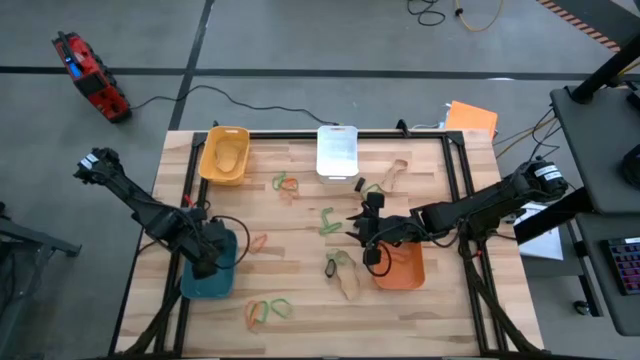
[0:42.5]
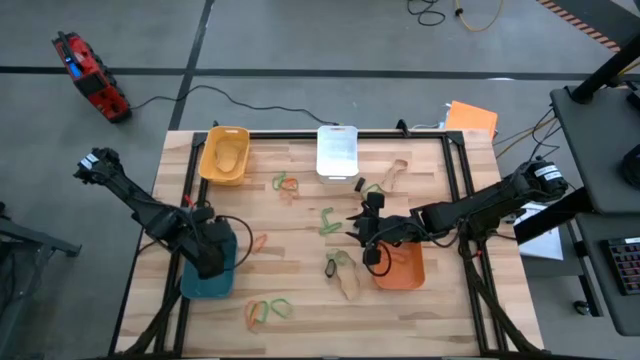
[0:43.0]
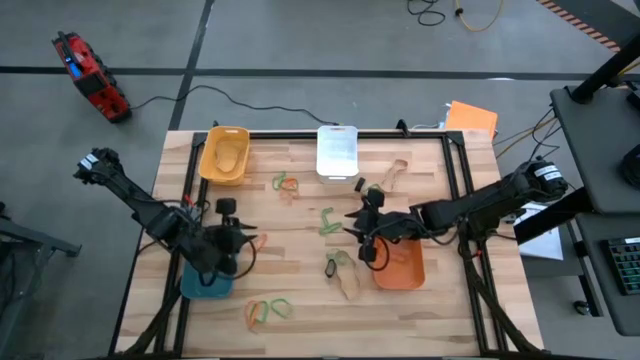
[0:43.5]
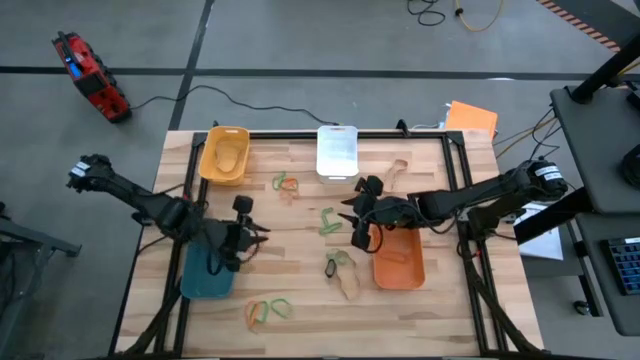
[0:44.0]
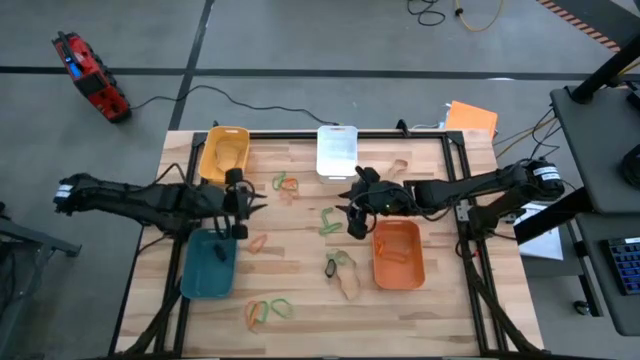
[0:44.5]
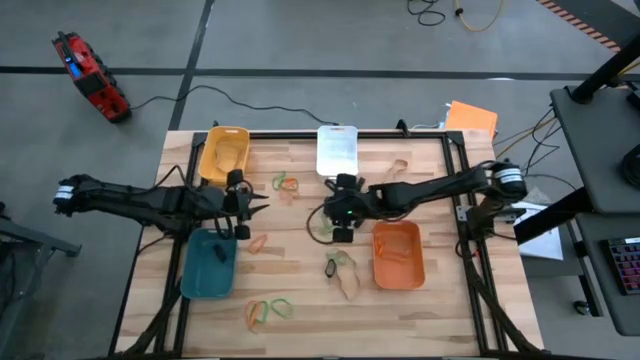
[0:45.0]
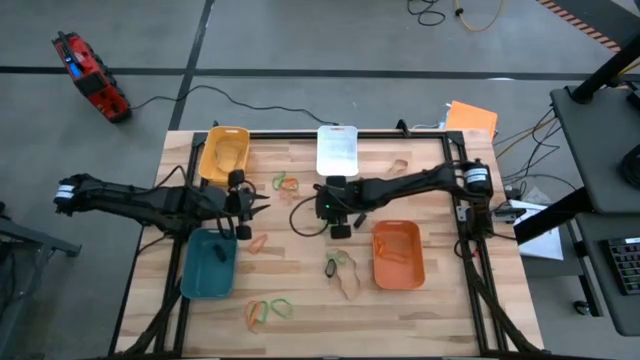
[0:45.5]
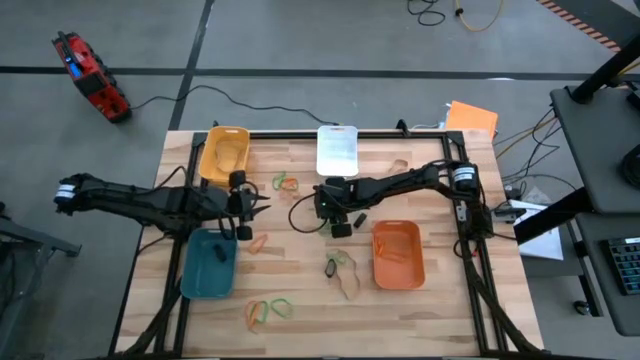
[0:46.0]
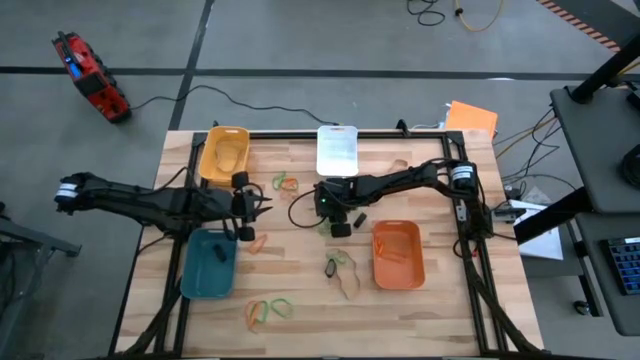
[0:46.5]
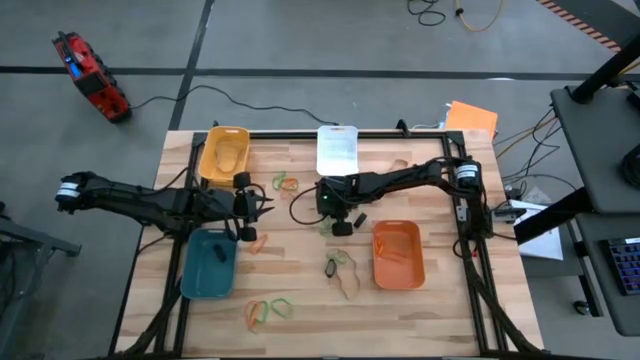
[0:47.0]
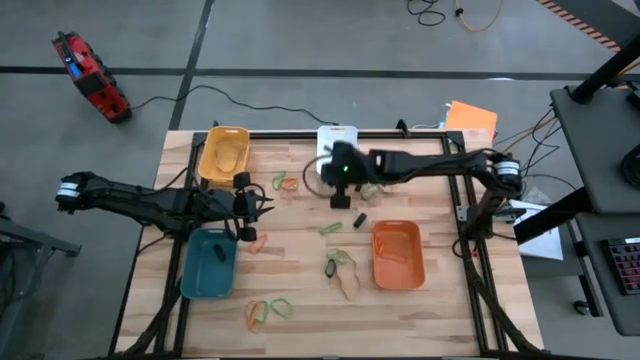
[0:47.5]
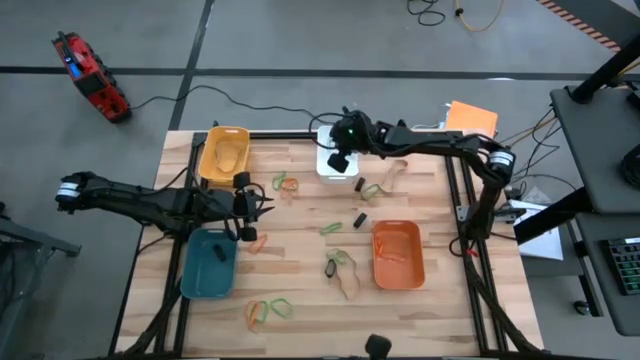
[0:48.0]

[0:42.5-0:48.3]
Task: Sort rubber bands into baskets
Put the green rubber band into the white bin

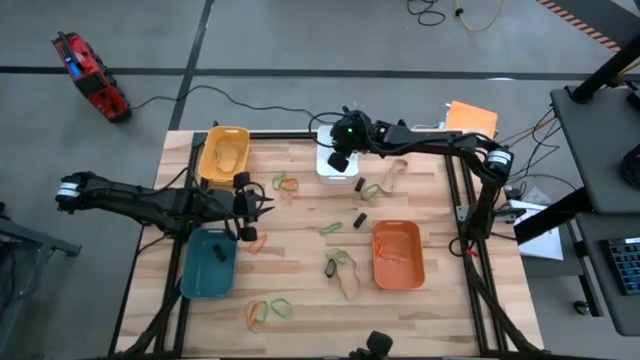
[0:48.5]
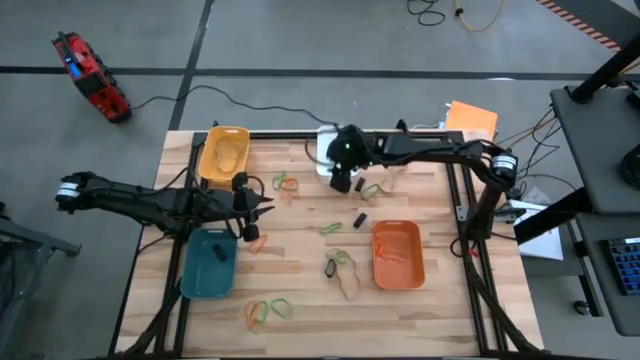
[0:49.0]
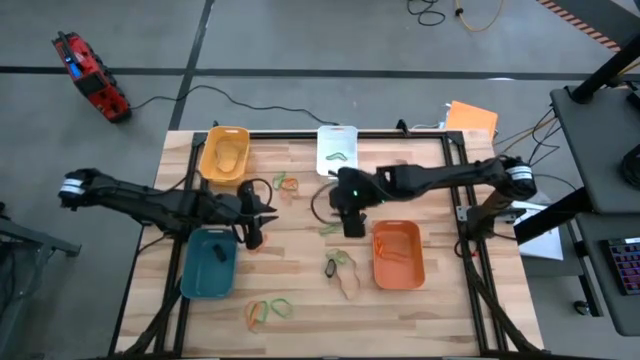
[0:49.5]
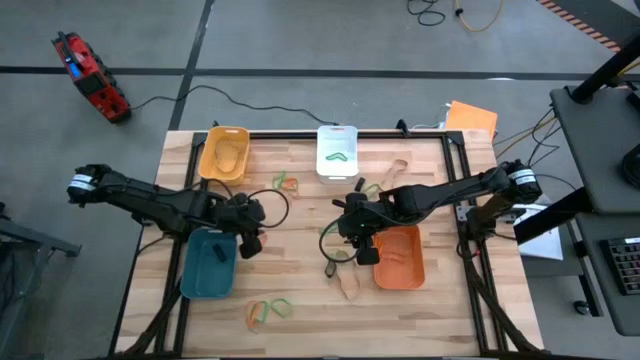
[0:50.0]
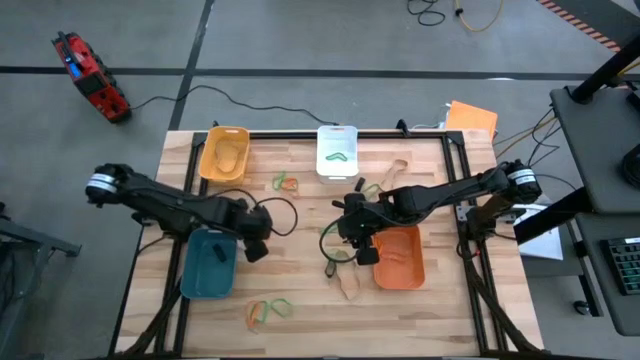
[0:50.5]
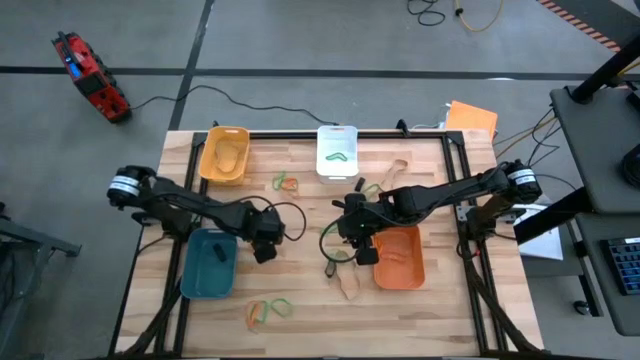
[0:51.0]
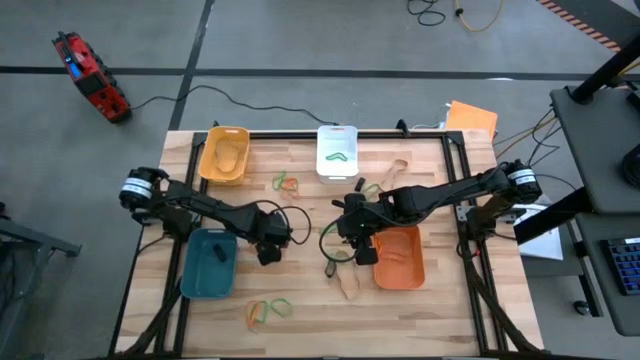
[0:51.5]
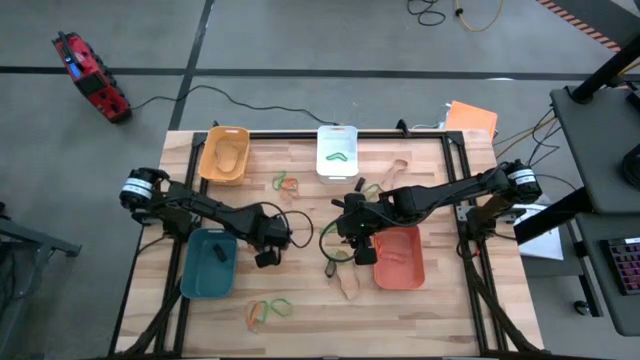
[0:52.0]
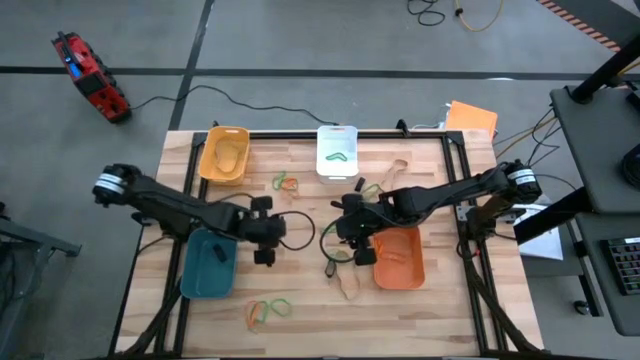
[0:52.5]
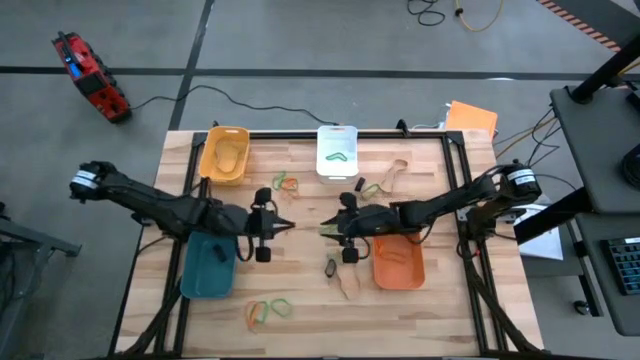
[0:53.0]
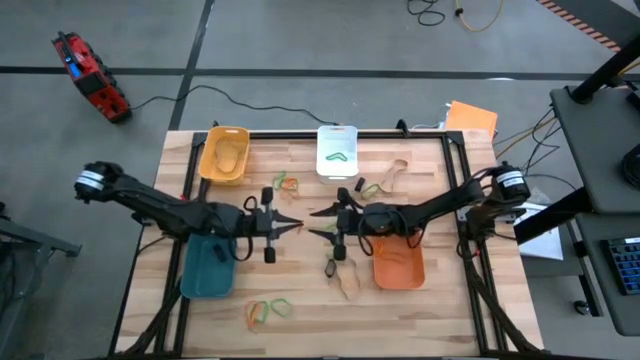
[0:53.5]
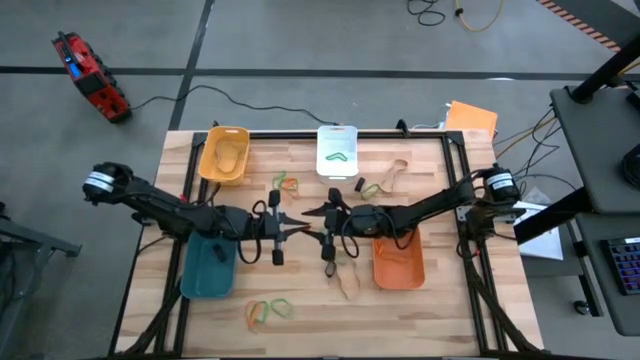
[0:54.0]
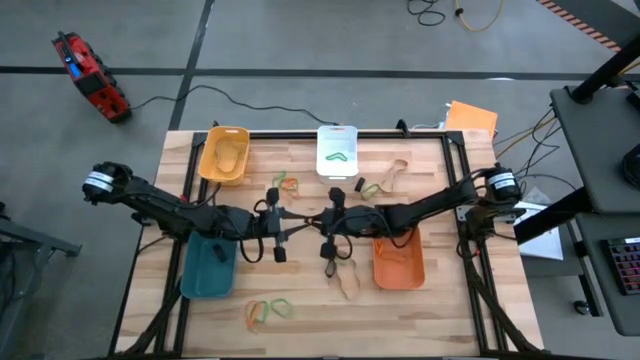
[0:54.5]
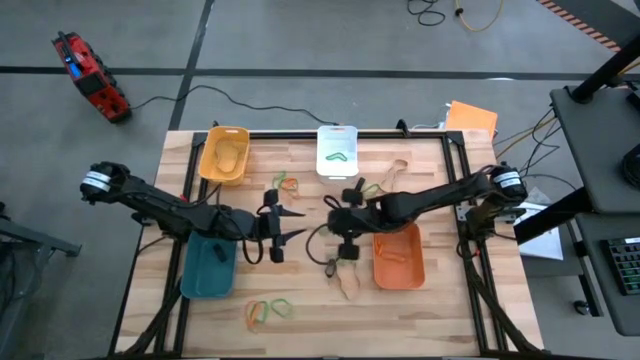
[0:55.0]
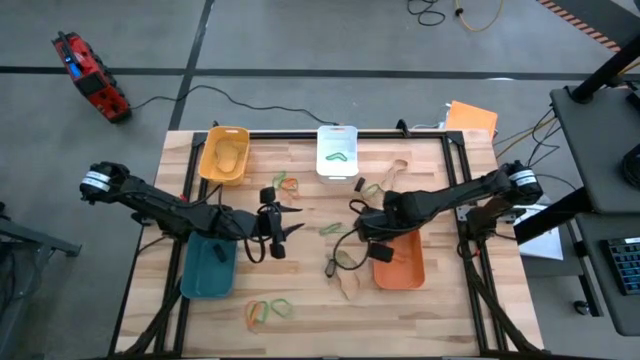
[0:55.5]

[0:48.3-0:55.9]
Put the orange rubber band into the orange bin

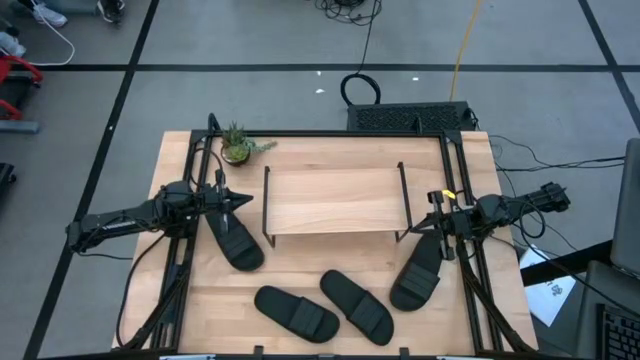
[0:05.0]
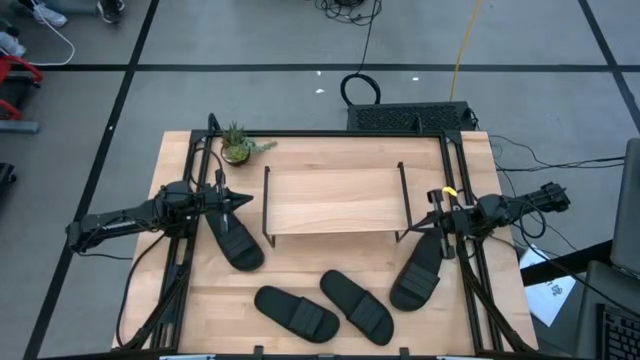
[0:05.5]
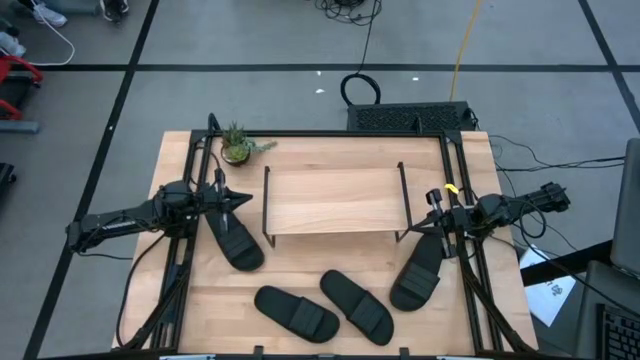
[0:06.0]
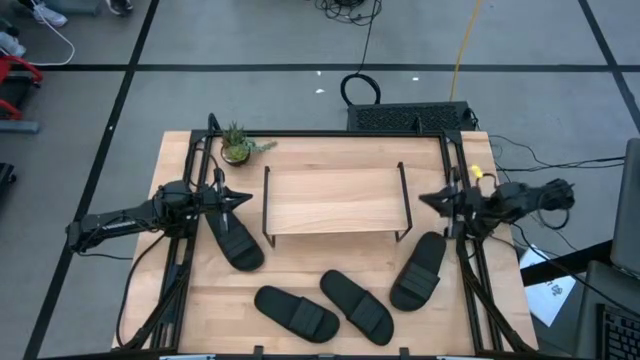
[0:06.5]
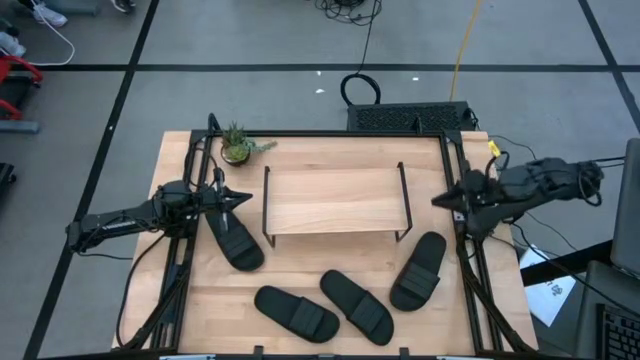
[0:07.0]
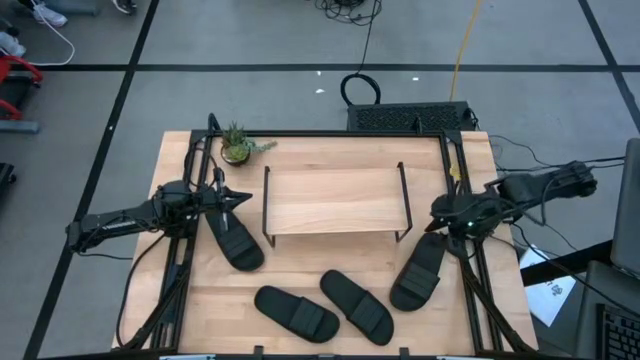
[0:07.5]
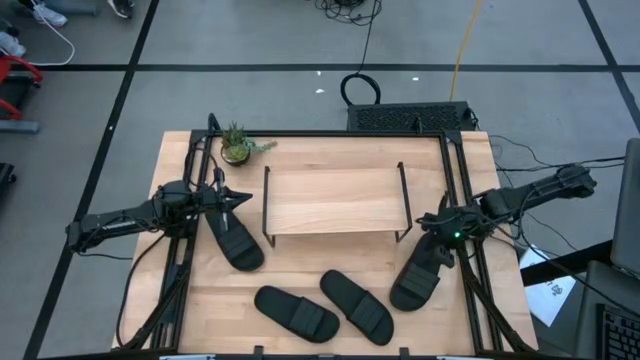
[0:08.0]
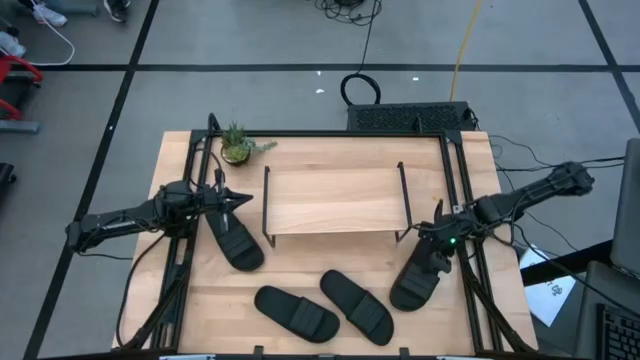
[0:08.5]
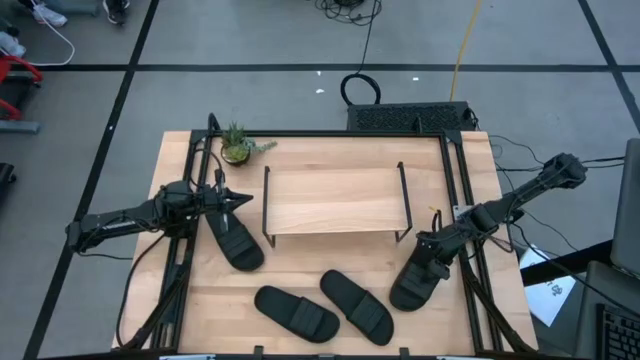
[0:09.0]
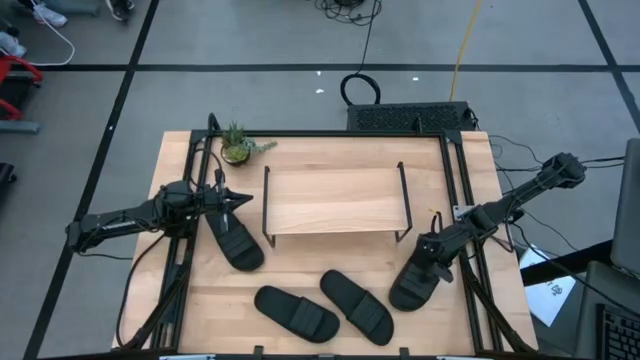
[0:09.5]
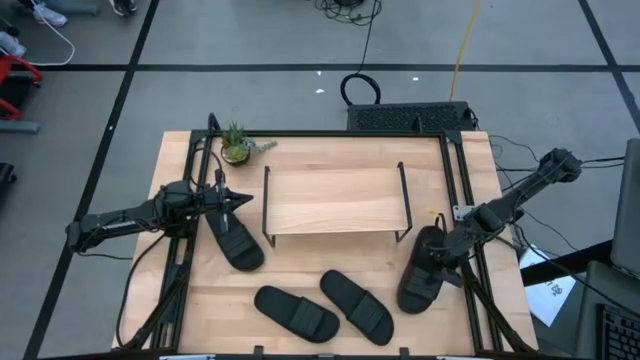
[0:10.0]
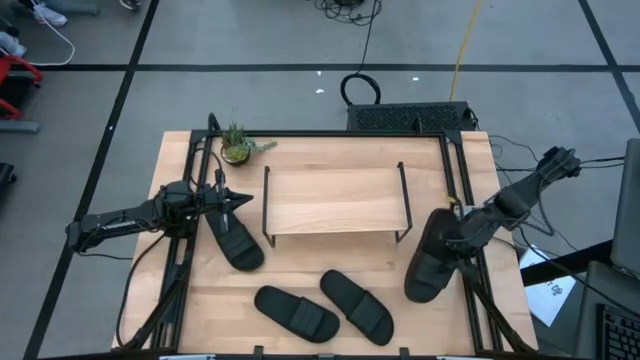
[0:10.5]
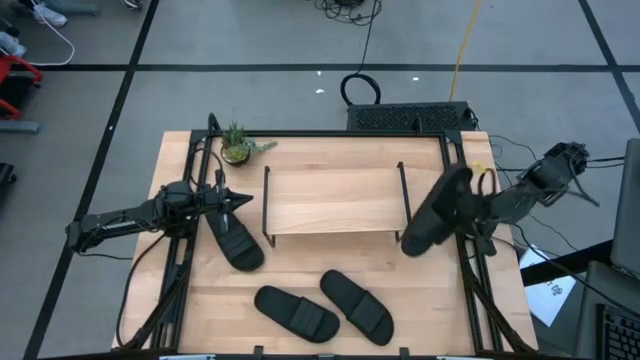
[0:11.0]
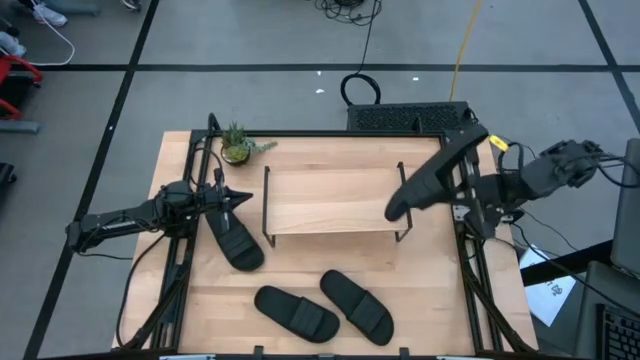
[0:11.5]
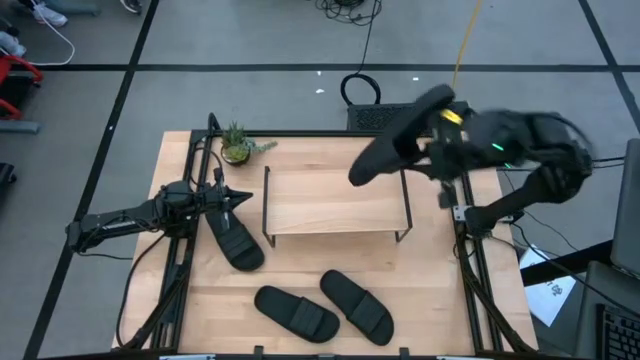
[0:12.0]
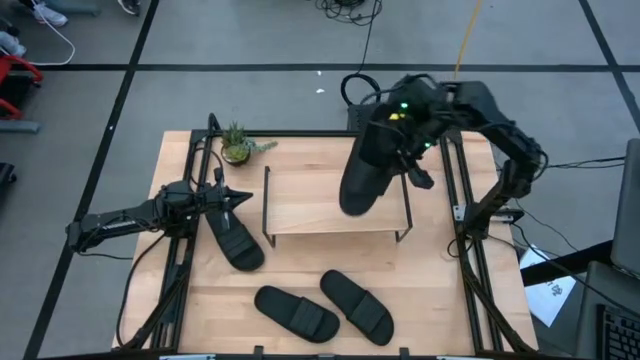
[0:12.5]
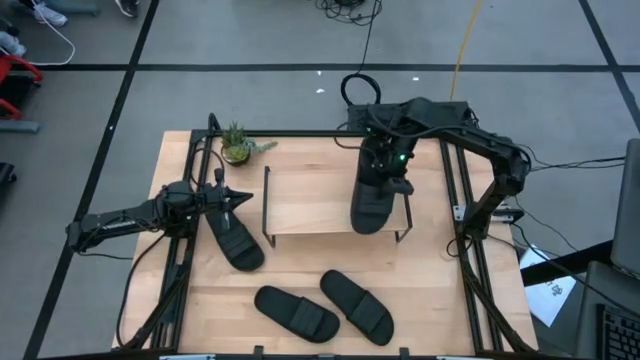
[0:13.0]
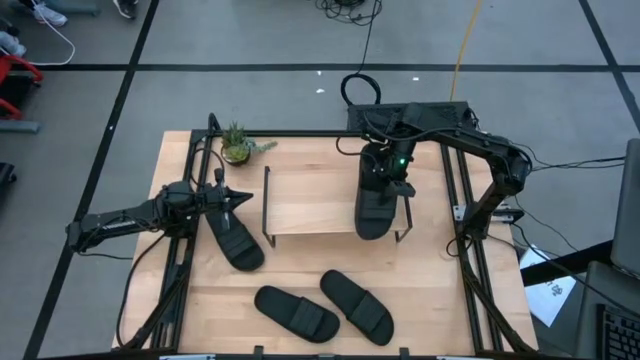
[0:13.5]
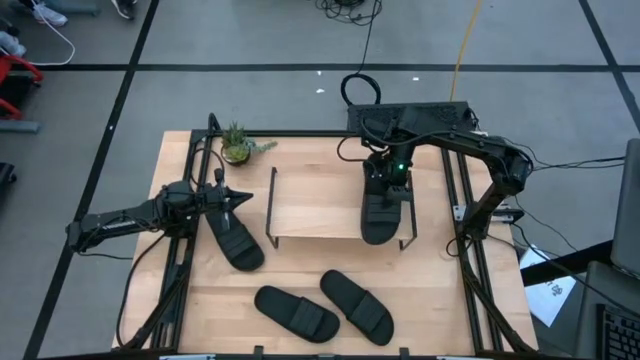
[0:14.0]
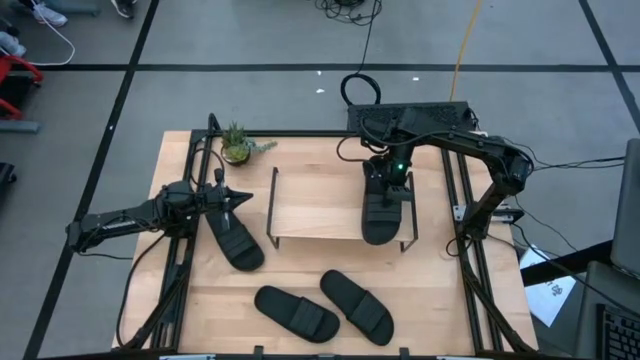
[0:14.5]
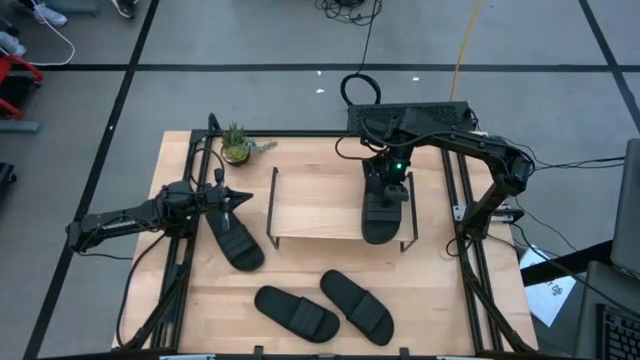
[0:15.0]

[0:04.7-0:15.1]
Task: Pick and place slides into the shelf
Put the black slipper on the shelf
